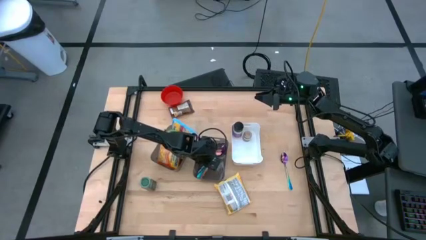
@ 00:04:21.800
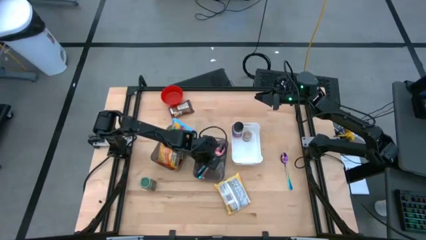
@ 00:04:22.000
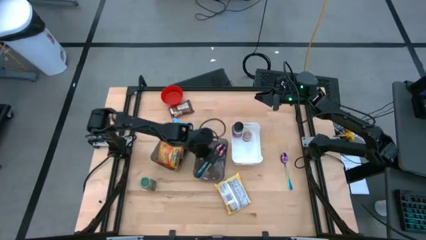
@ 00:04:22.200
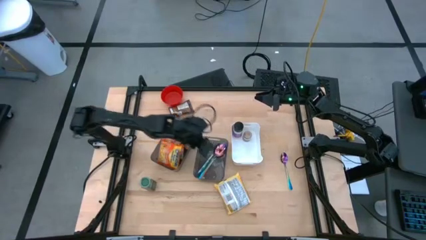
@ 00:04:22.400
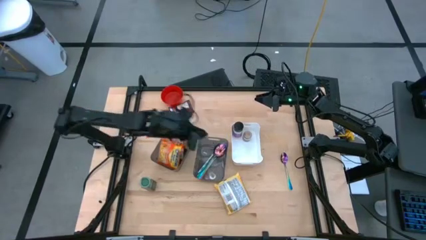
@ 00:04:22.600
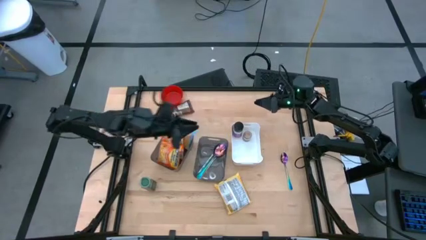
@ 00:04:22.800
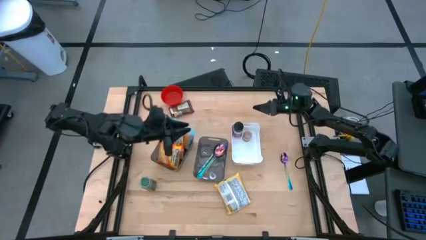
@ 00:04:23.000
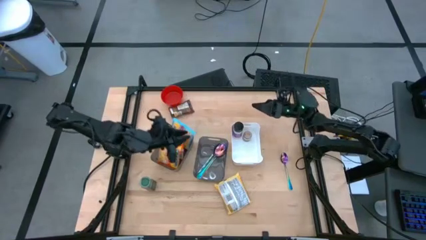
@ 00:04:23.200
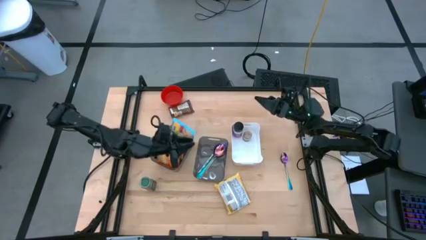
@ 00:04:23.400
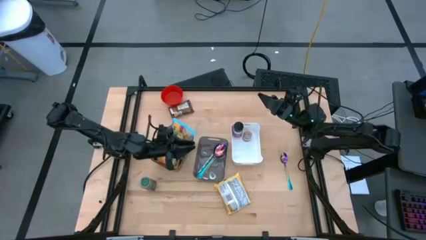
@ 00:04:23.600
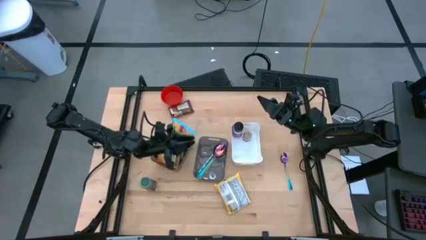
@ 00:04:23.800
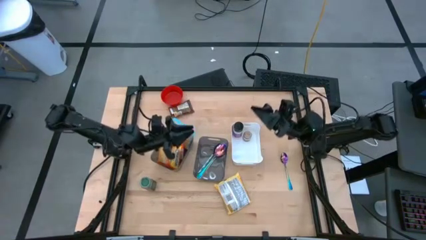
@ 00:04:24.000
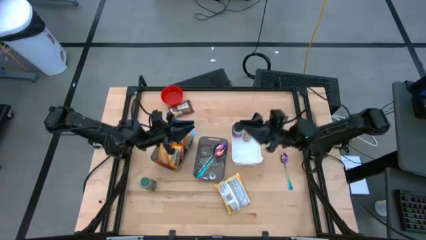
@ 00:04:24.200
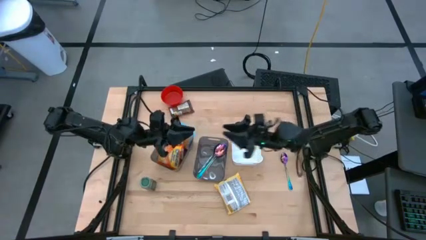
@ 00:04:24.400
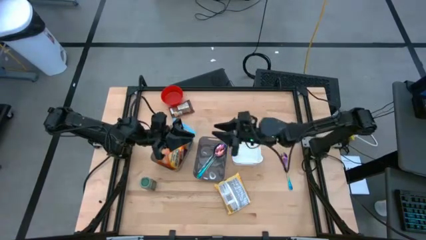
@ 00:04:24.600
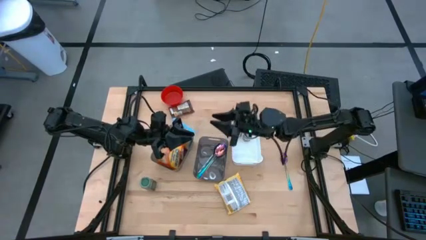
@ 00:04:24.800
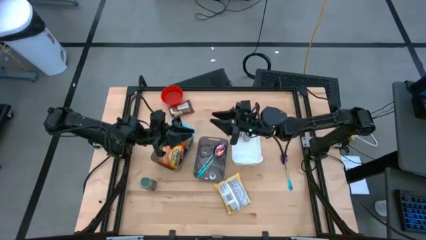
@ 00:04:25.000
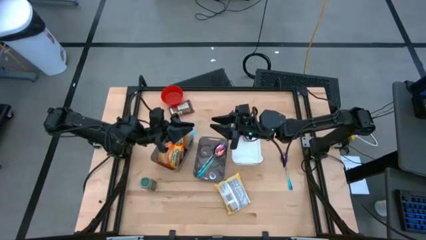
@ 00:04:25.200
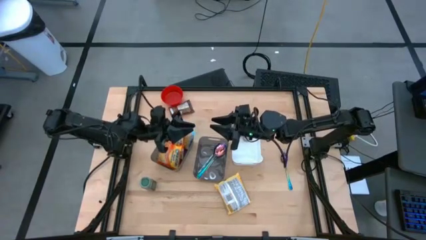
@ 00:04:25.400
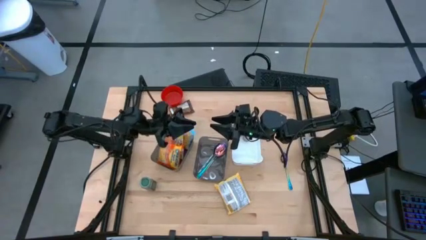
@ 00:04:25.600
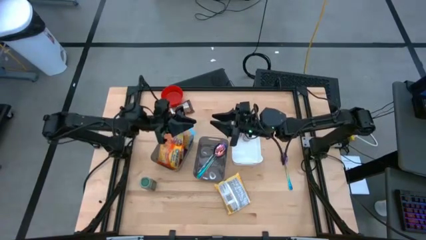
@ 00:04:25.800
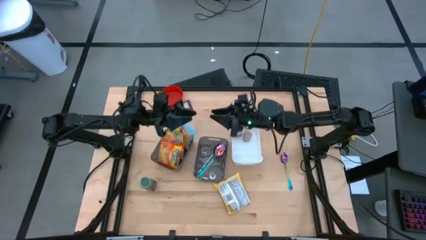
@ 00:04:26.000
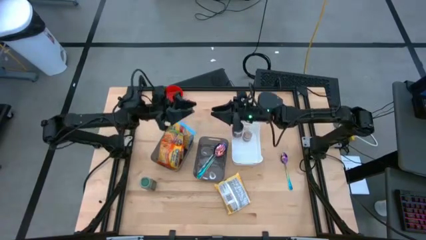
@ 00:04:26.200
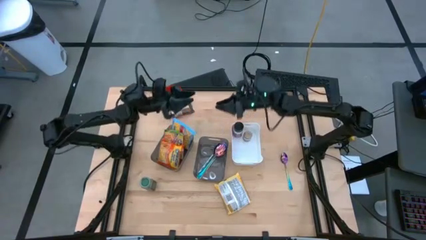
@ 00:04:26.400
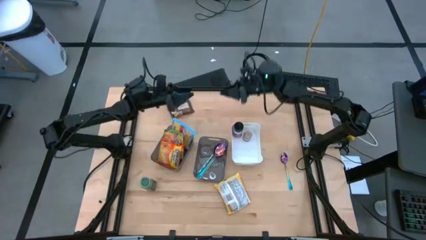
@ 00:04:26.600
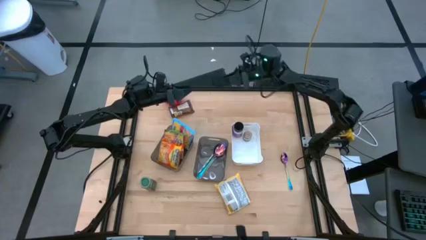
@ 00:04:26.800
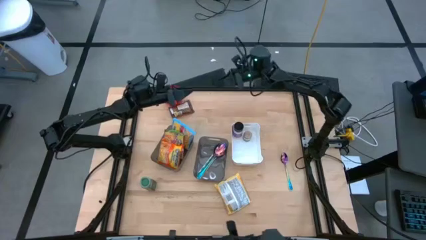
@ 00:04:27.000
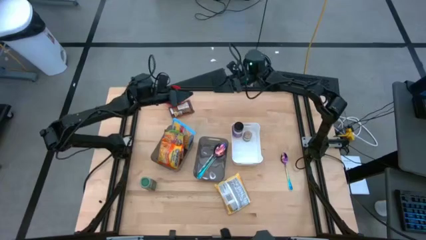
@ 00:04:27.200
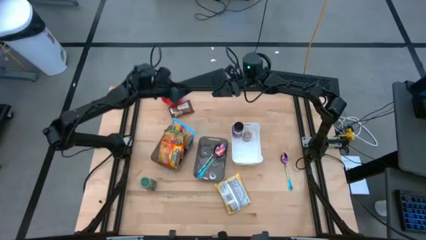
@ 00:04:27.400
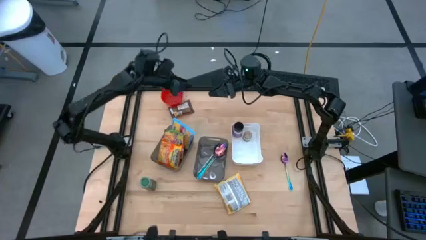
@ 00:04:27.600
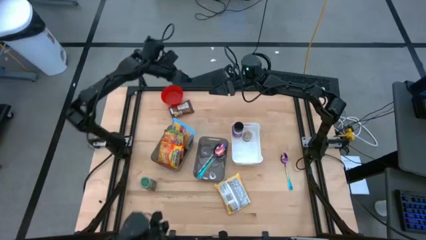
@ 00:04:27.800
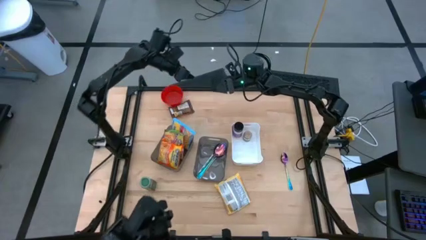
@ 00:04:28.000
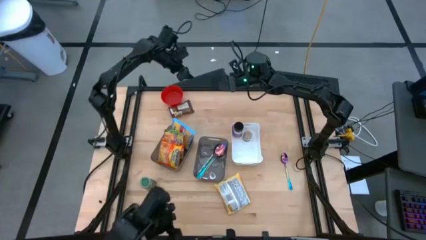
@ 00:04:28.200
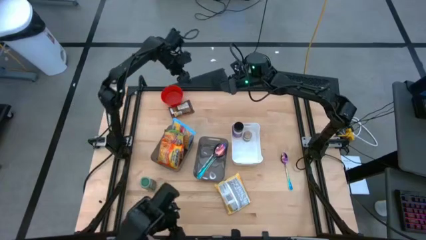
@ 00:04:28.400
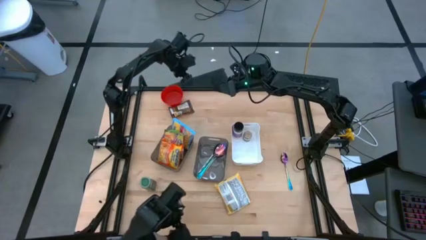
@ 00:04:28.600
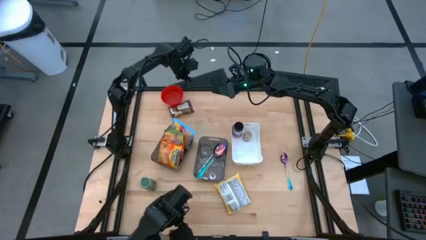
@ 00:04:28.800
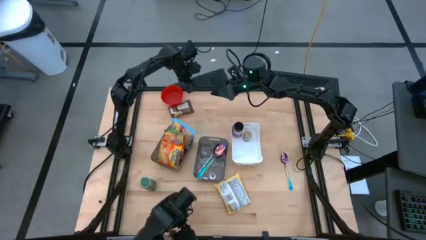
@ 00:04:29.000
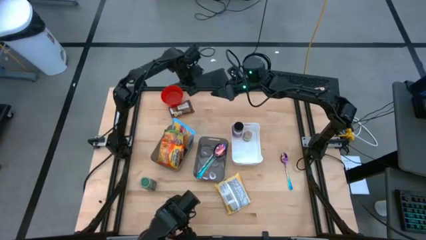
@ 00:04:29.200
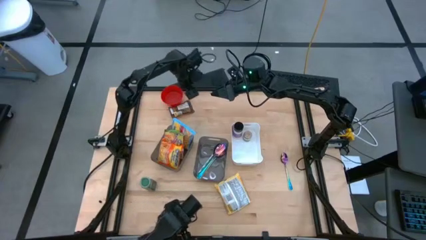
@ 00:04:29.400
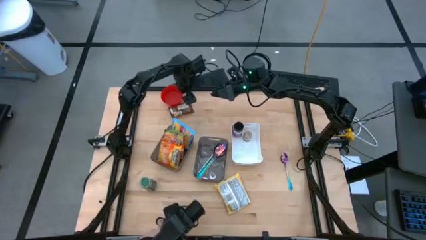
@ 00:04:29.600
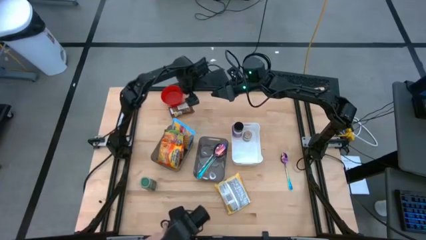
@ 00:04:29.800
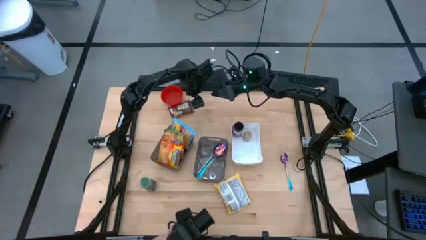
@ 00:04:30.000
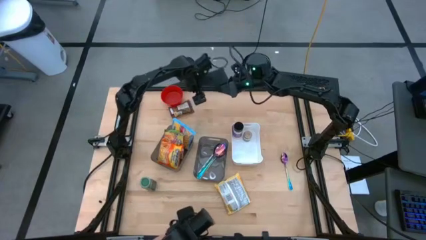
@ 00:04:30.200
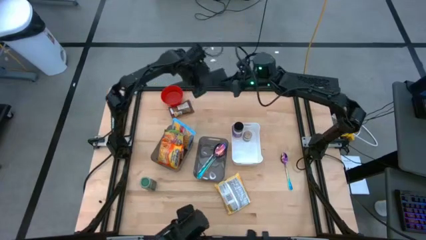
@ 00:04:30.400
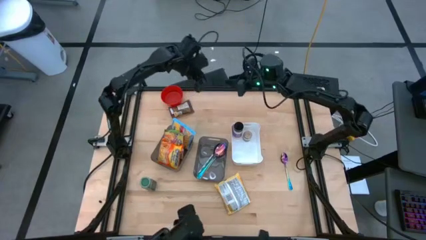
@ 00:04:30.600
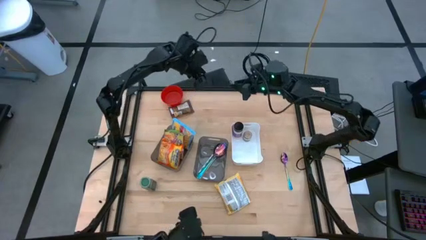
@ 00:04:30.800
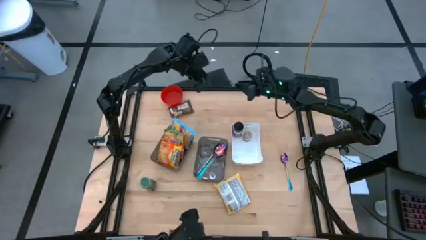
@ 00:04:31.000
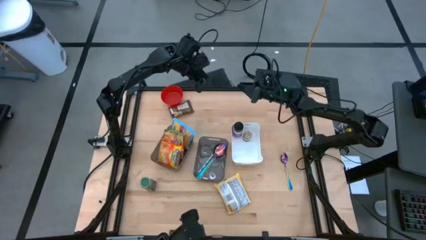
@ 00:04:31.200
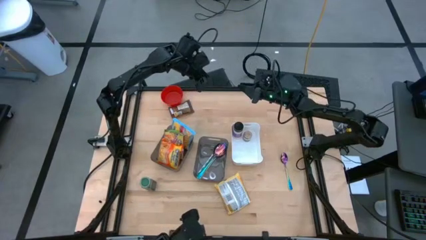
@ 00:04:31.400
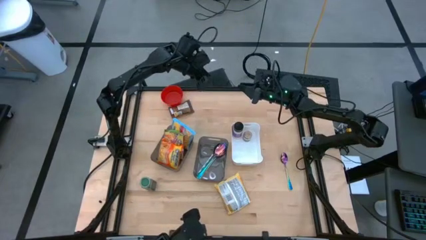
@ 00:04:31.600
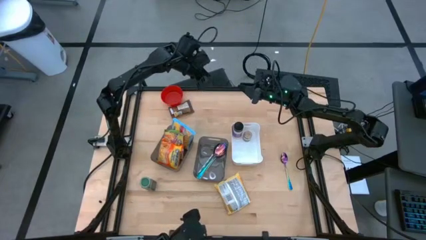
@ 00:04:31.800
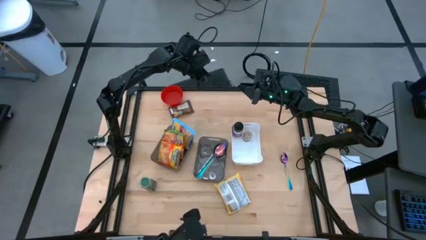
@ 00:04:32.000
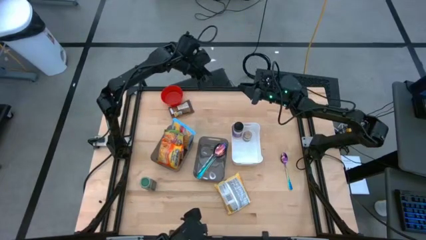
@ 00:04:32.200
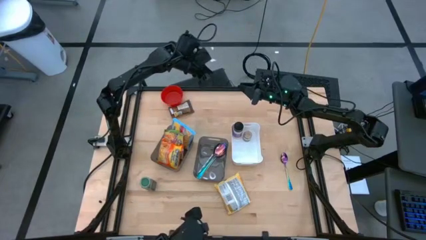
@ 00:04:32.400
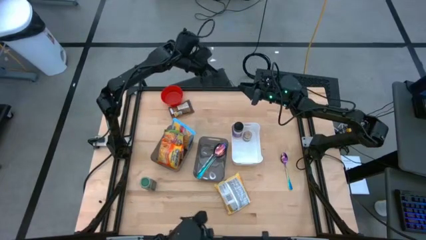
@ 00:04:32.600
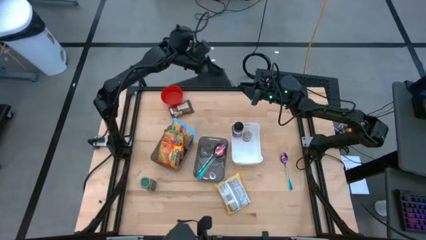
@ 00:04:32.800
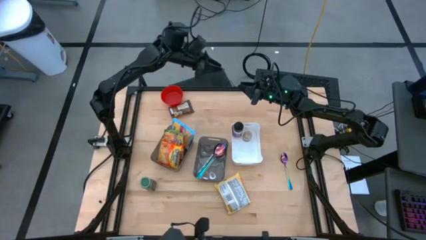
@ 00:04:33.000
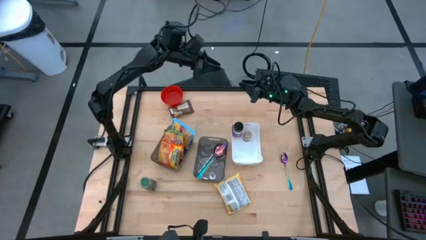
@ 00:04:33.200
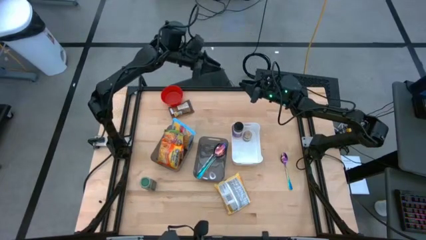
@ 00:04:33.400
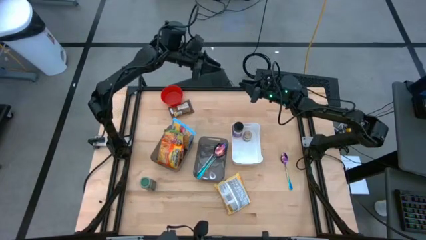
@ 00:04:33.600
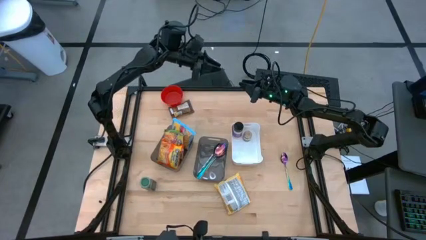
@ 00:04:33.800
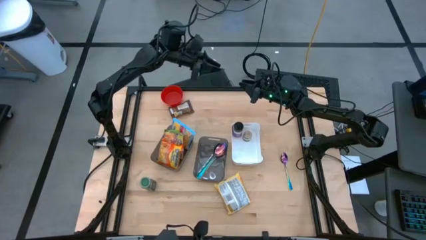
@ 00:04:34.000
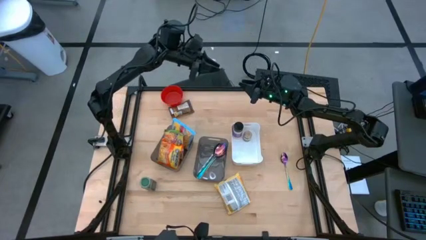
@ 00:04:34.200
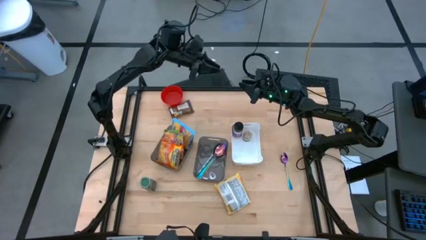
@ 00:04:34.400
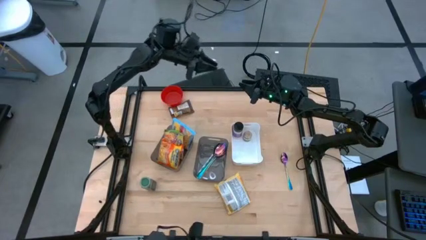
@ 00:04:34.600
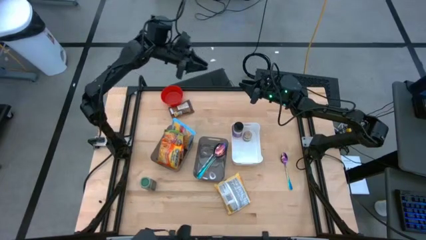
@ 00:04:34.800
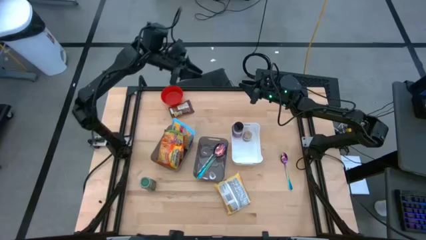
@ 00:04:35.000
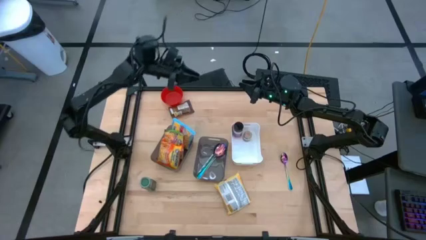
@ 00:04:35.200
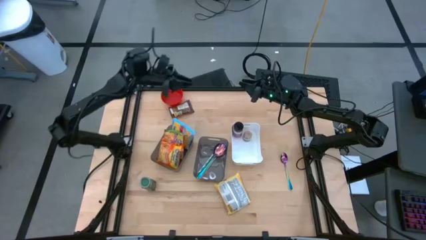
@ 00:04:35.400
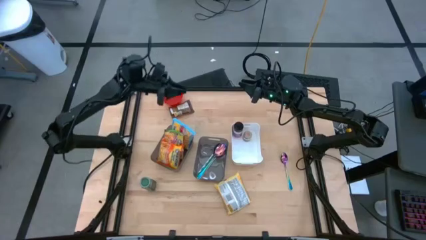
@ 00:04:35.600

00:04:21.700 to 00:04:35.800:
Task: Pick & Place Food Item
Put the blue spoon into the right gray bin

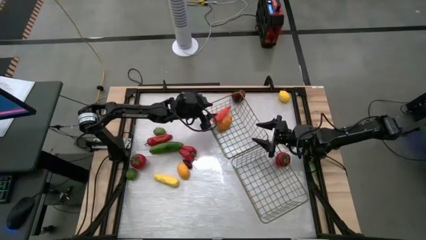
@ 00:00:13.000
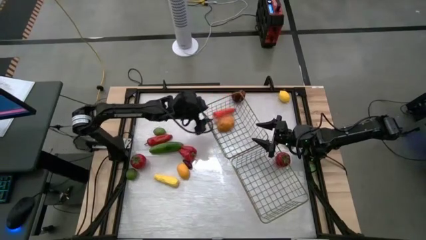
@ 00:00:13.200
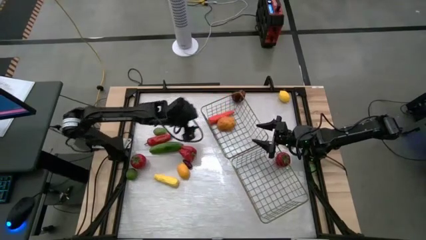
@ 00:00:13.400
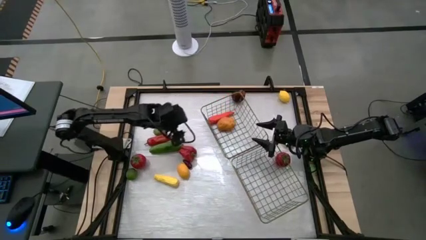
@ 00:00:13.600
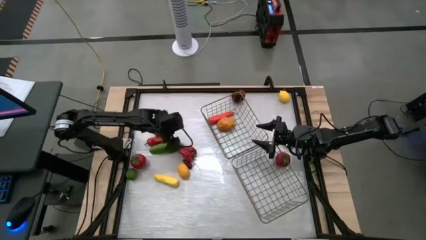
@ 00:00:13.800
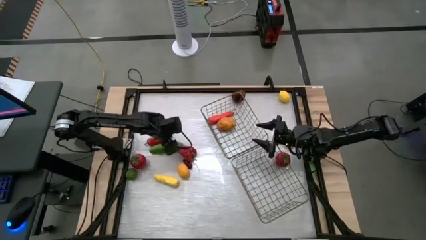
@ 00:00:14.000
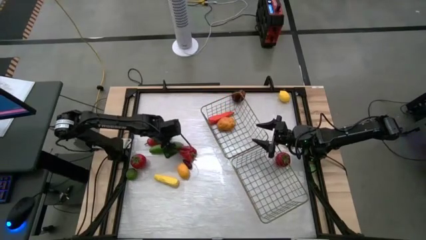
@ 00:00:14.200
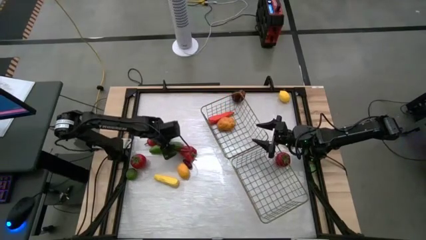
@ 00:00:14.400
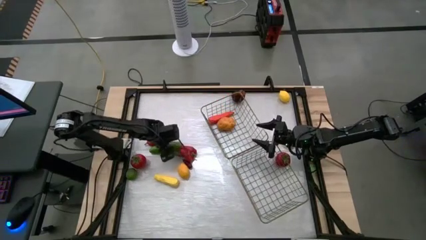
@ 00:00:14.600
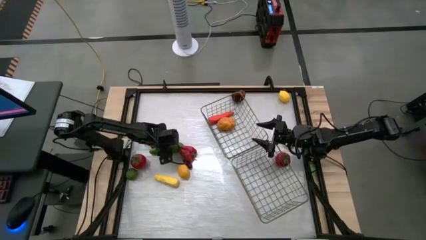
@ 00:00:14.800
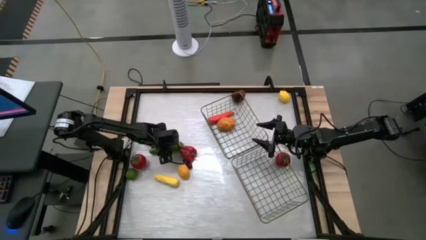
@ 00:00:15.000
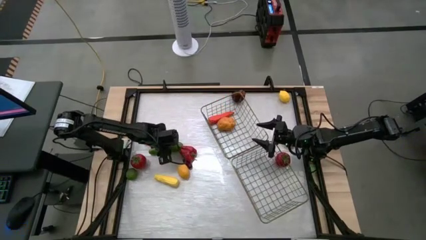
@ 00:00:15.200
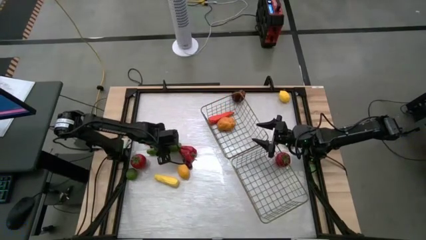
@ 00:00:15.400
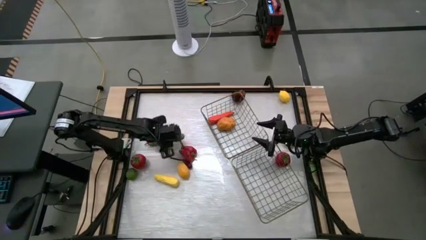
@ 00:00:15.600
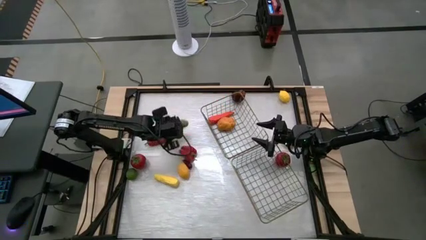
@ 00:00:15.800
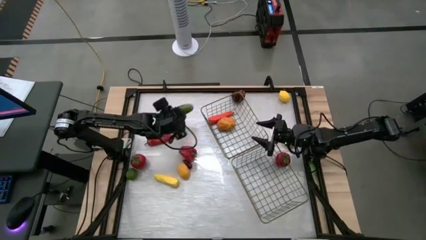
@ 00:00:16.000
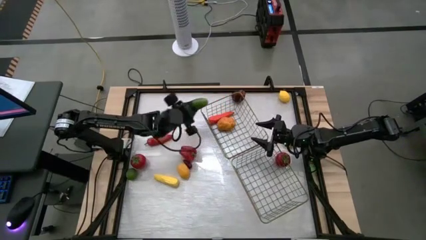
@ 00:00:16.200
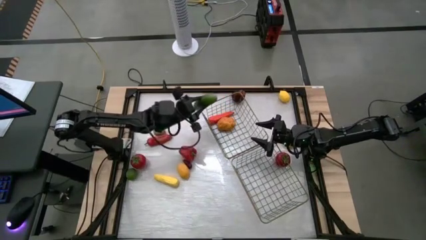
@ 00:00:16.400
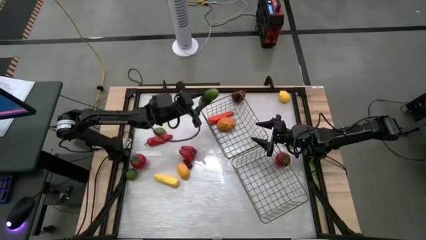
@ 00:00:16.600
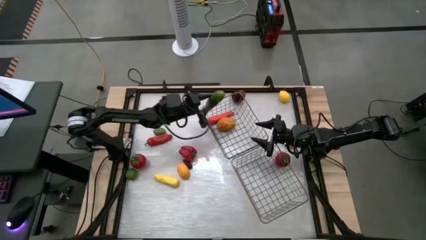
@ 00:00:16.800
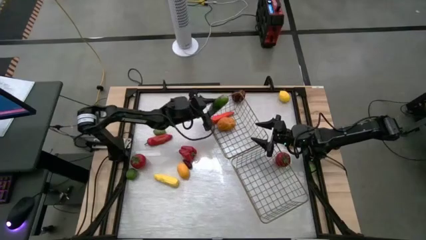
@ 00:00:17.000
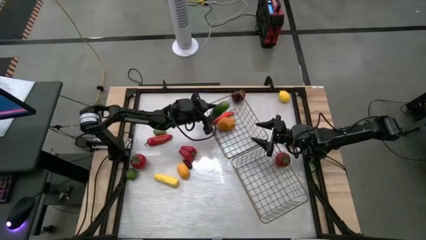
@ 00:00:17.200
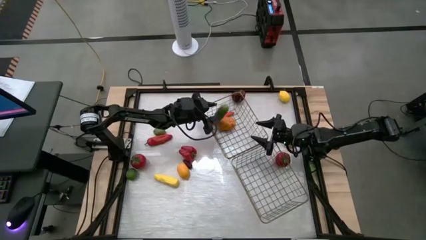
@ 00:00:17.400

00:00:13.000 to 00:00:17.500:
Task: Sort produce into baskets
Put the cucumber into the left wire basket
